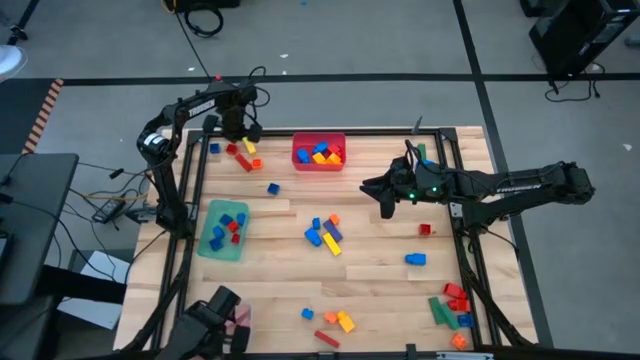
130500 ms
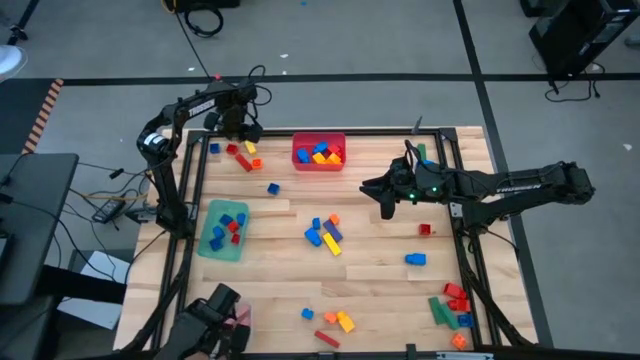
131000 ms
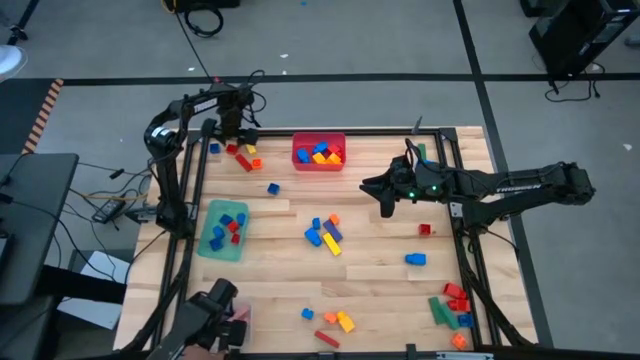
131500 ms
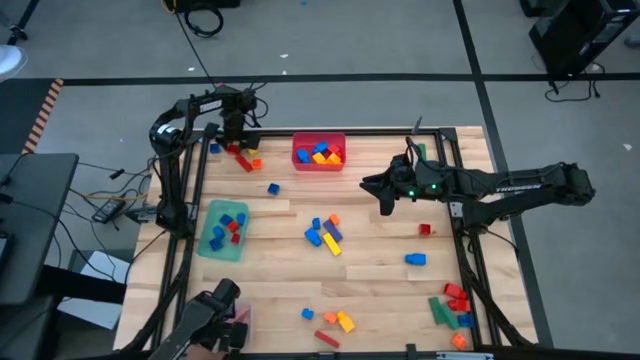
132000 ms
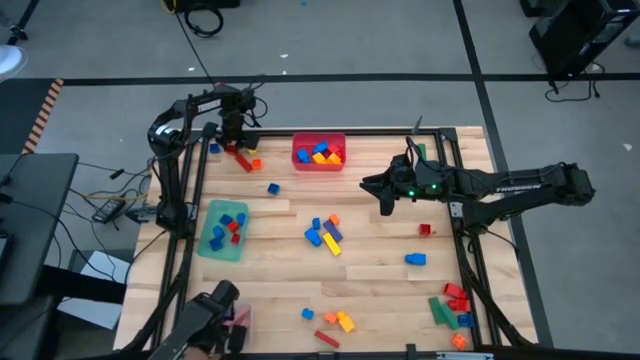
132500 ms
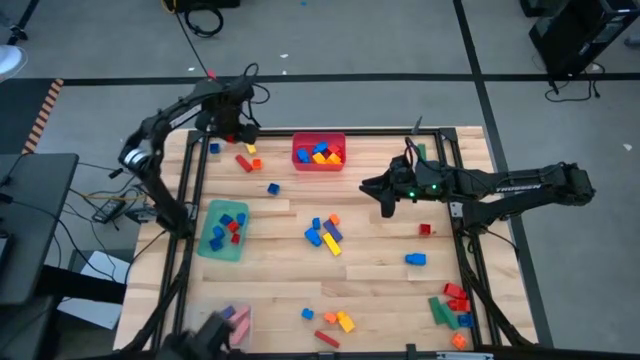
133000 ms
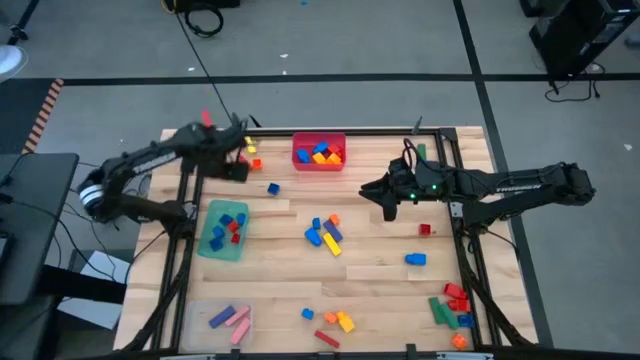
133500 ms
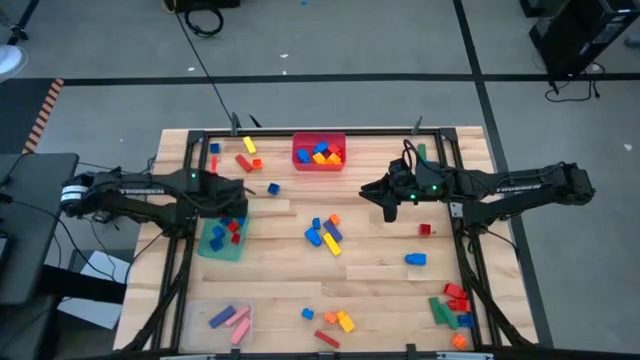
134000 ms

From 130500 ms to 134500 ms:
Task: Sort blocks by size
Put the red 4 studded building block into the teal bin

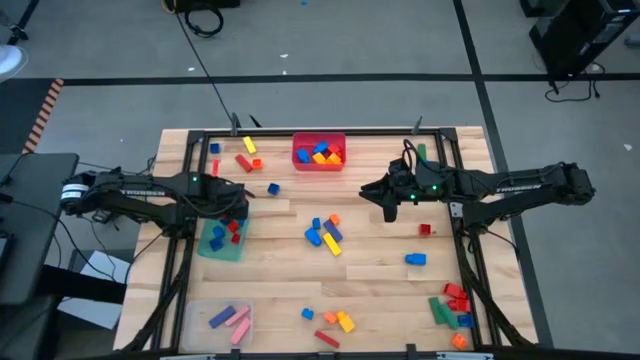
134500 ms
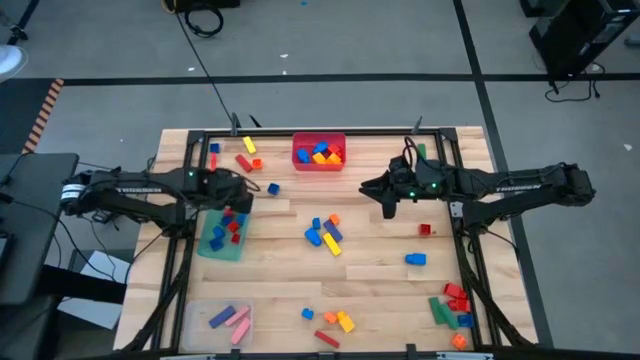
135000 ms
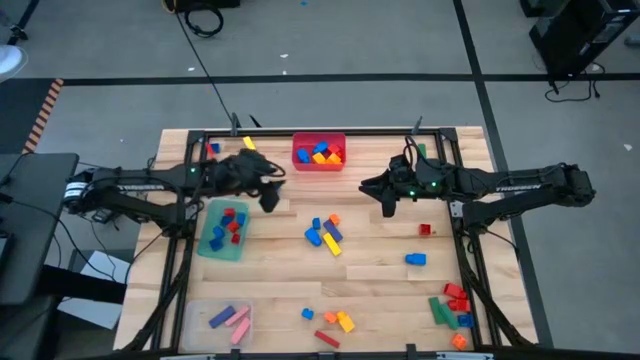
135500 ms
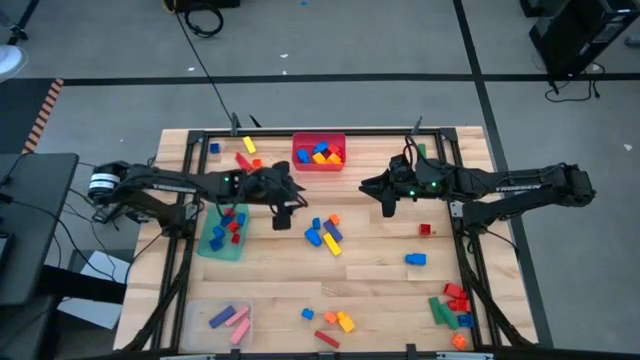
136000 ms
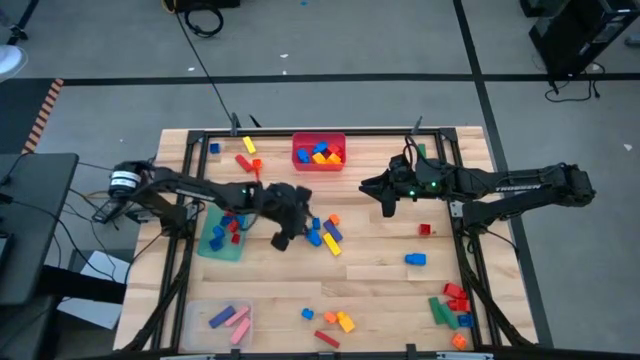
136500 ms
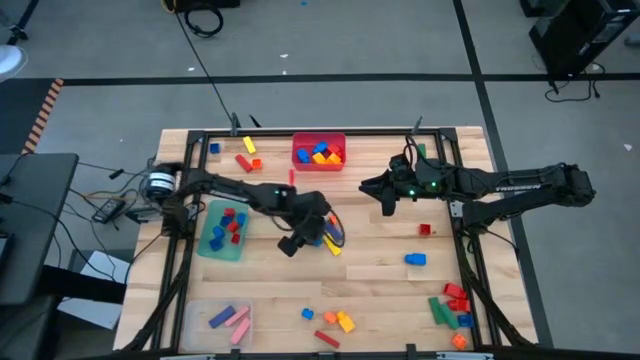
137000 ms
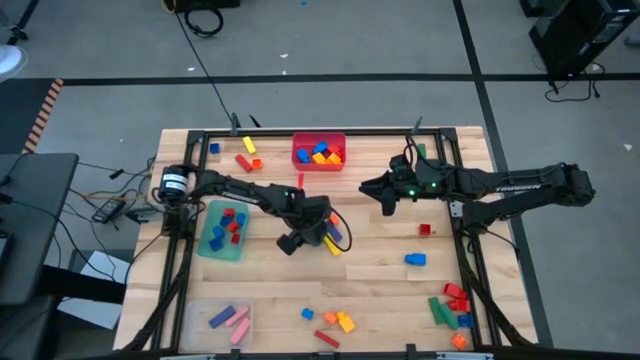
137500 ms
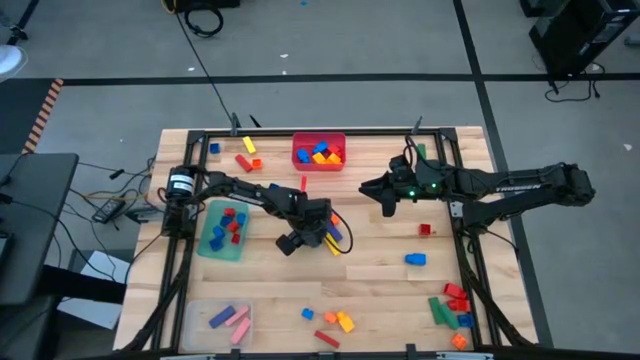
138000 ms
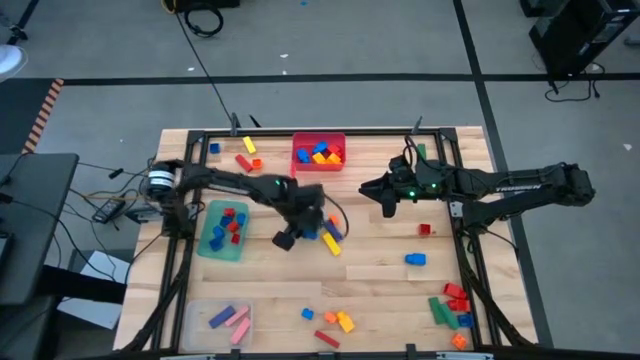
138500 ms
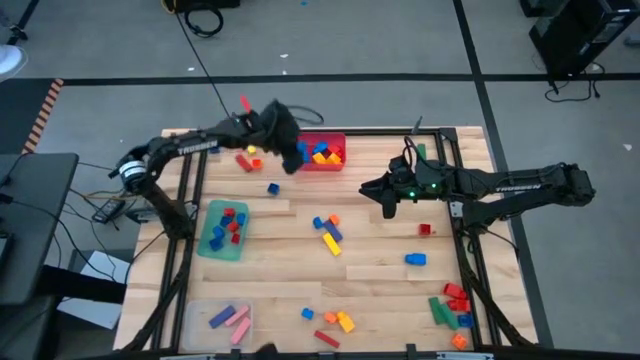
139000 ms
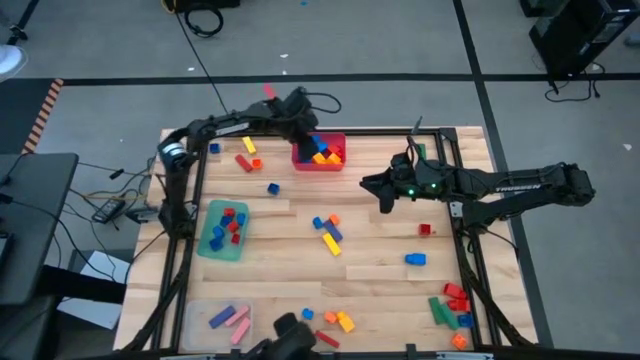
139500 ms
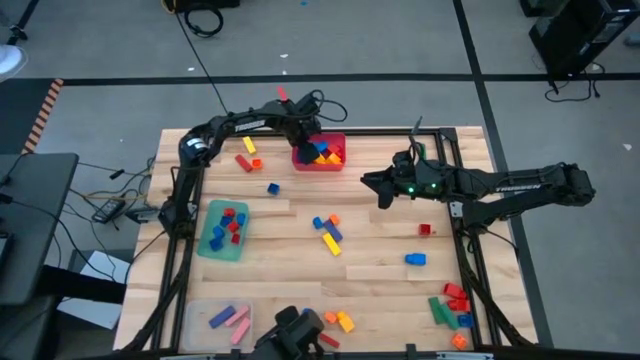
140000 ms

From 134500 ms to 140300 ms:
Put the blue 1 studded building block into the red bin

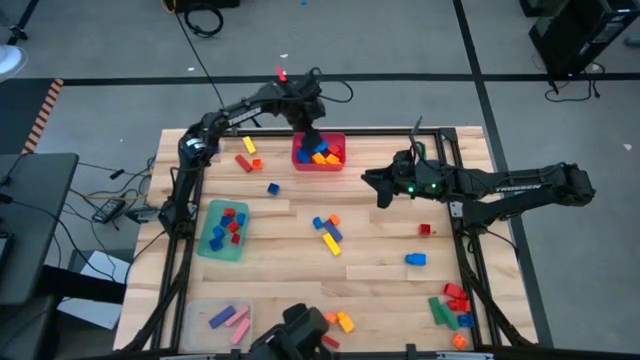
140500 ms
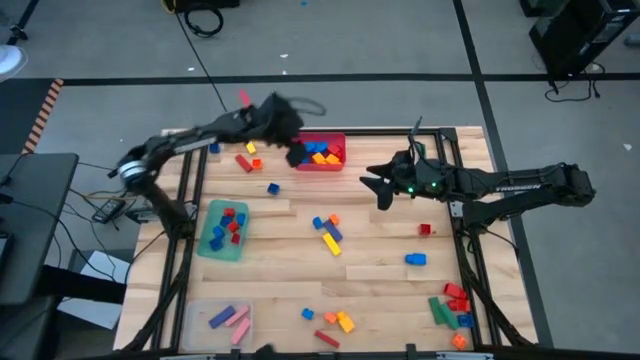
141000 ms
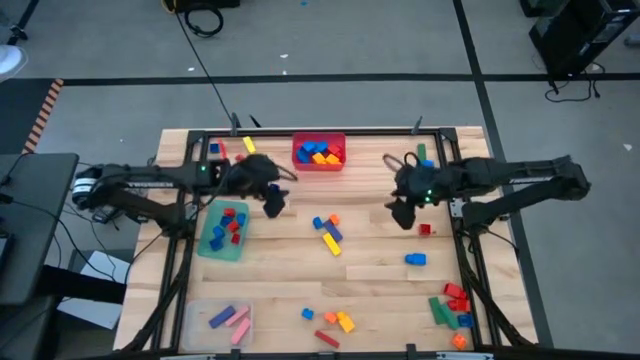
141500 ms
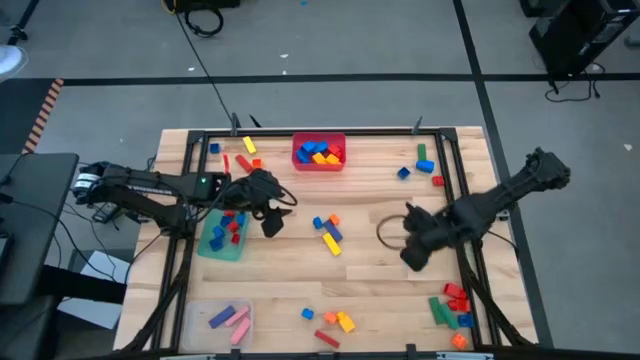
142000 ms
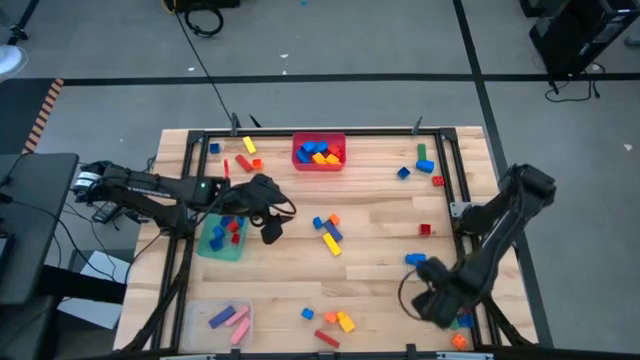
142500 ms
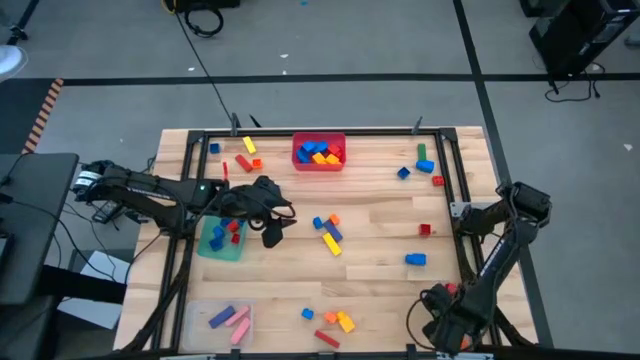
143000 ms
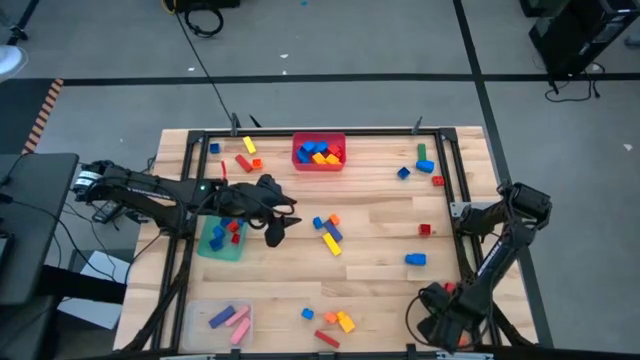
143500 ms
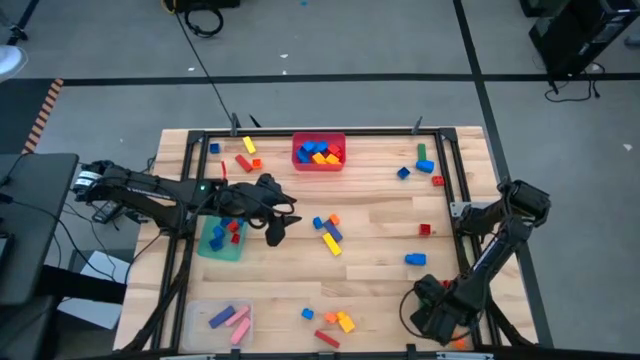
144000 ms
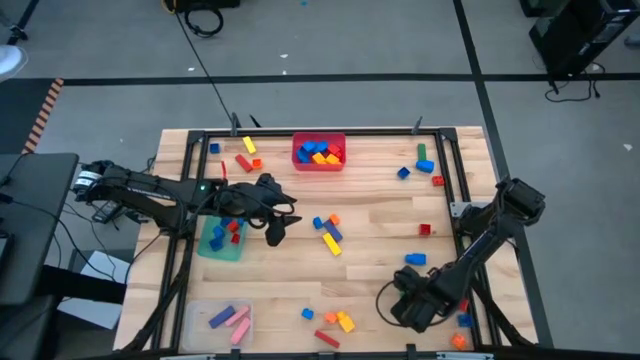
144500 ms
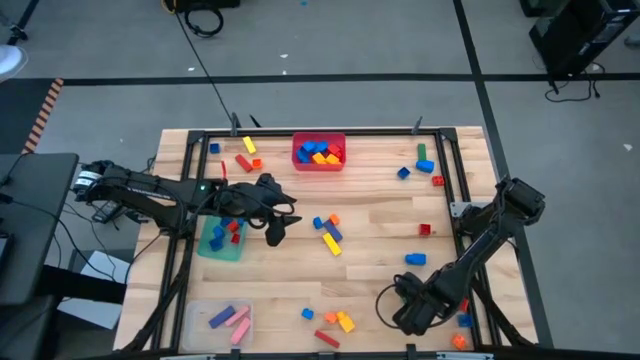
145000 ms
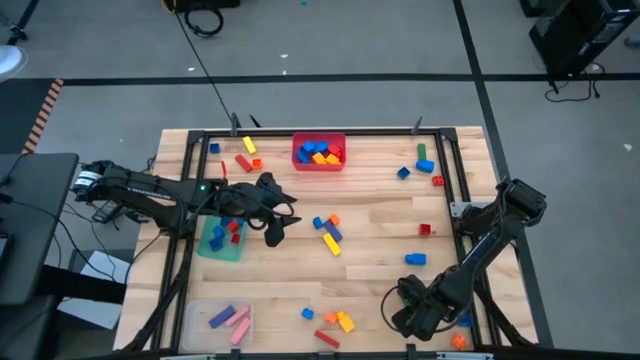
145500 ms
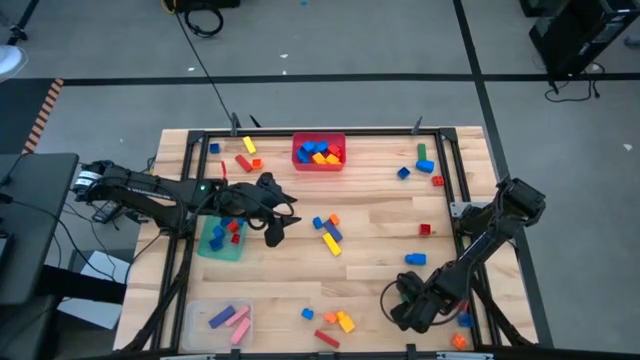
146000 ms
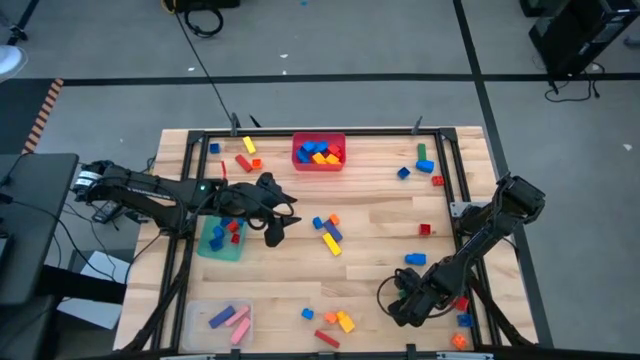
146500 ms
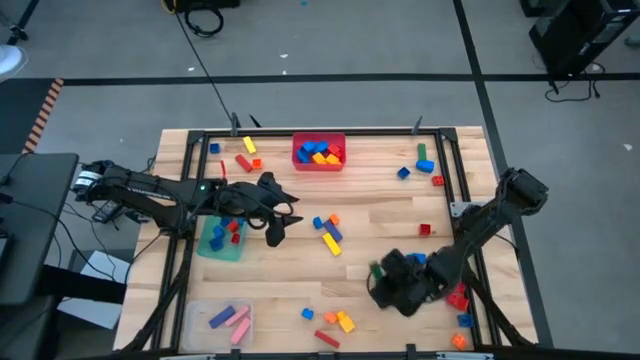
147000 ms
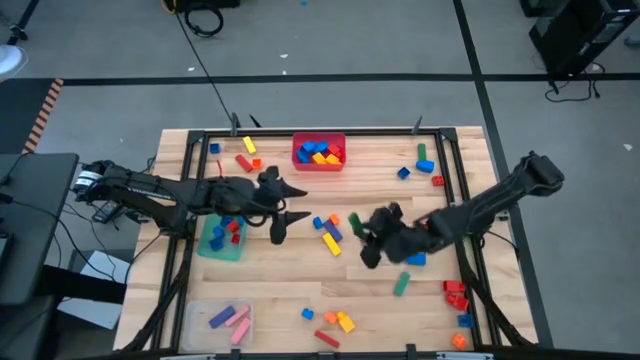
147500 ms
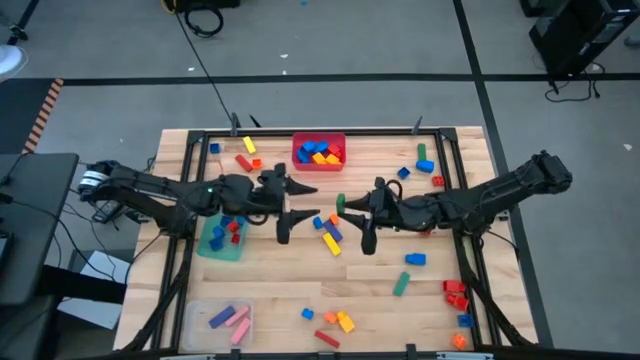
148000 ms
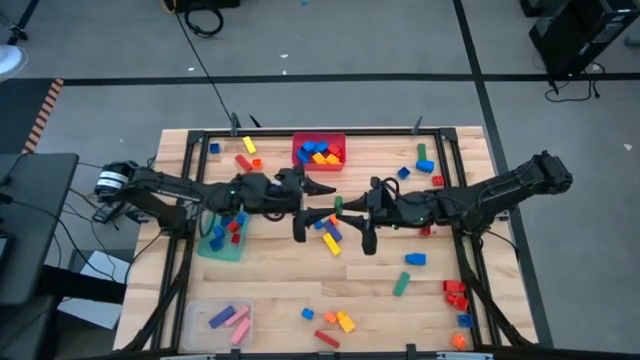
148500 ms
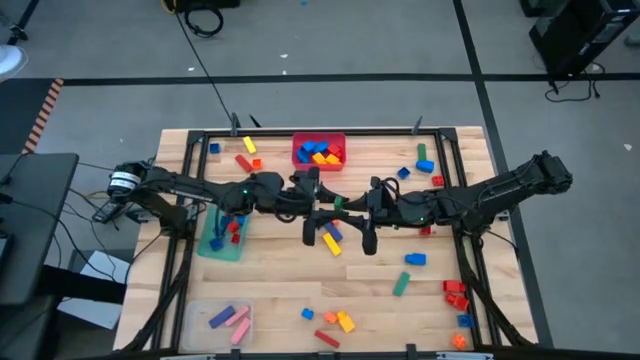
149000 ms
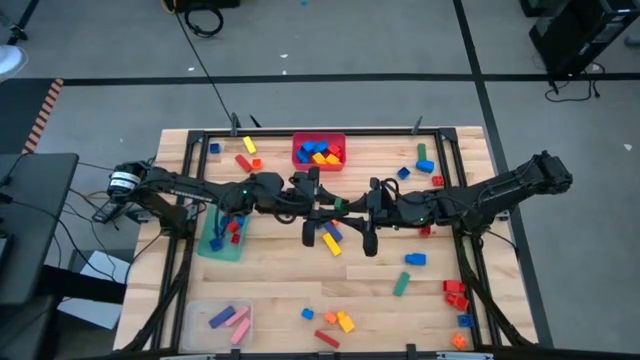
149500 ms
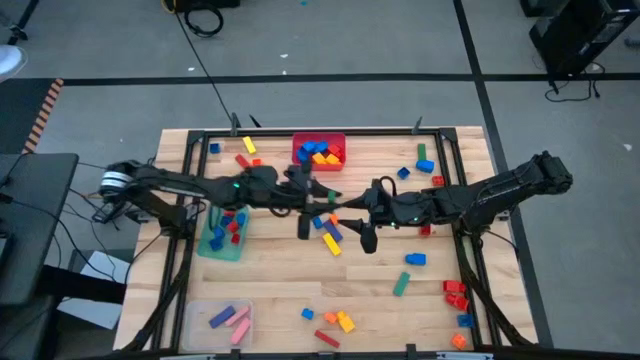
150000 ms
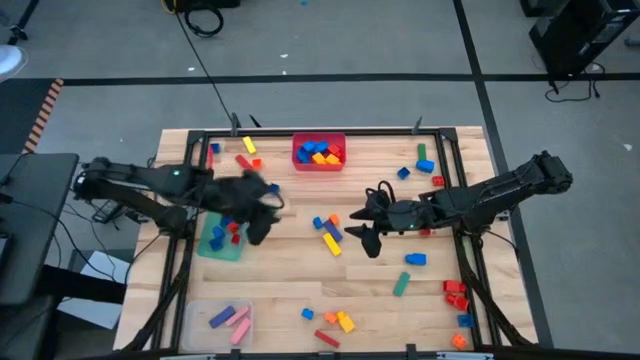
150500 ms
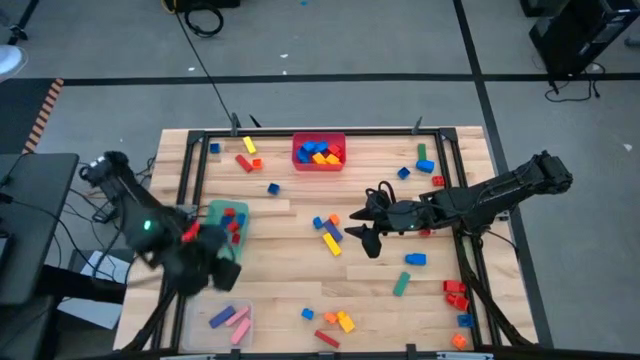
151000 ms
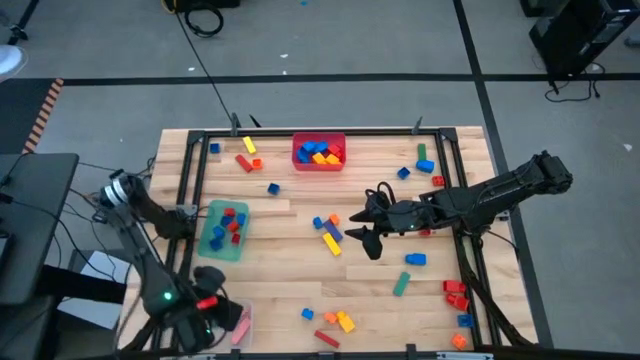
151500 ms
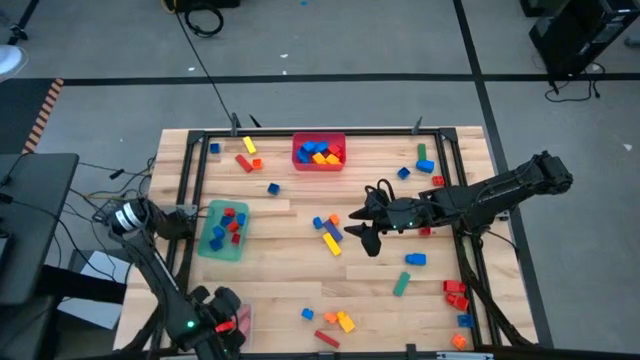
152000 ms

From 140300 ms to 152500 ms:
Put the green rectangle block into the transparent bin
